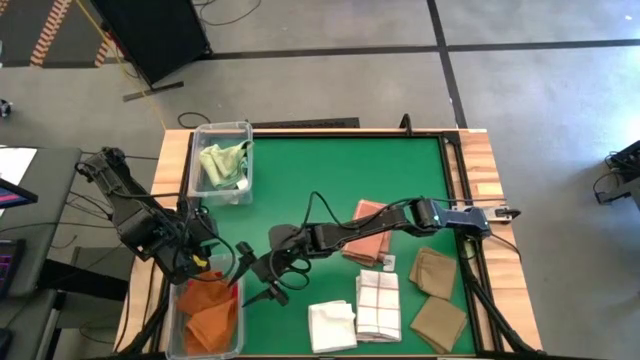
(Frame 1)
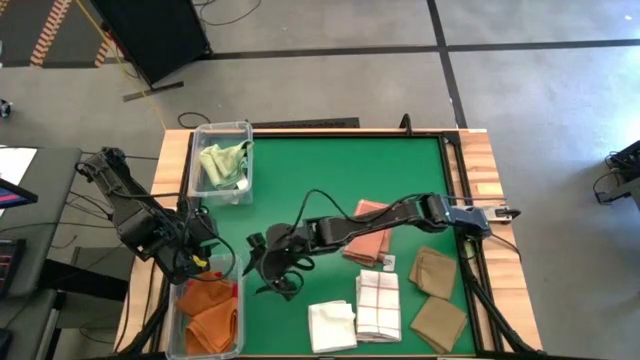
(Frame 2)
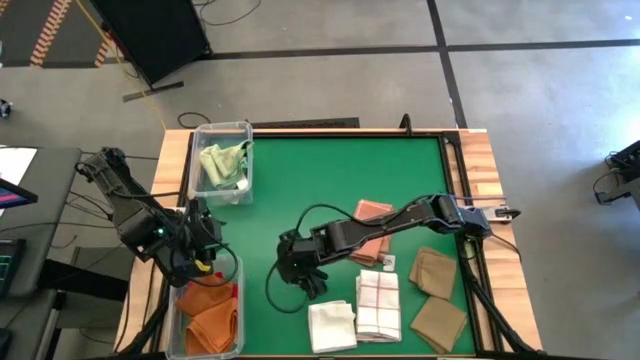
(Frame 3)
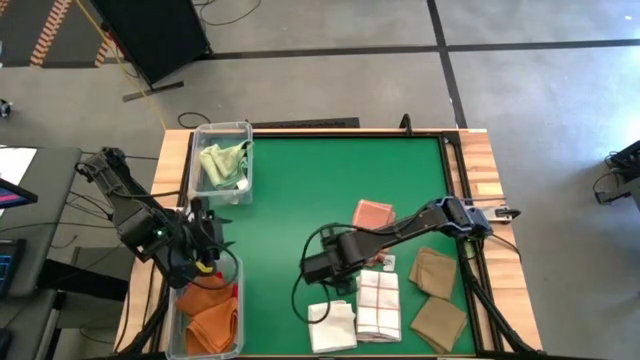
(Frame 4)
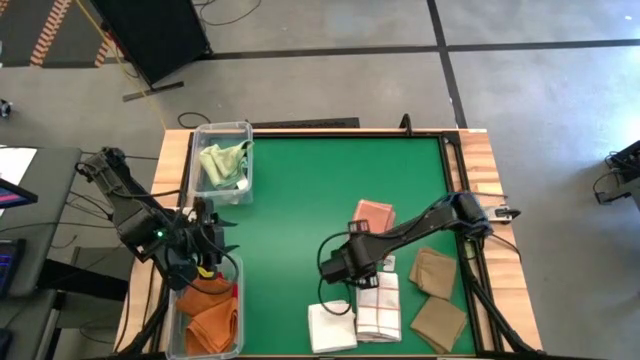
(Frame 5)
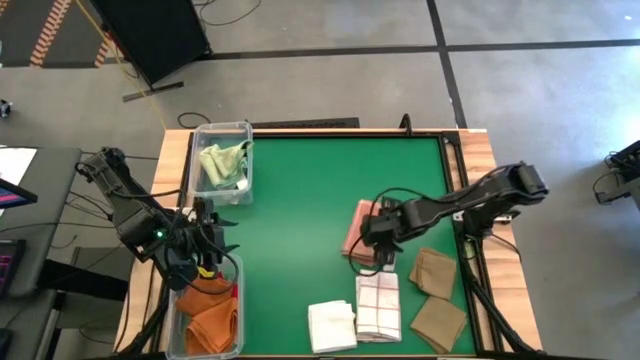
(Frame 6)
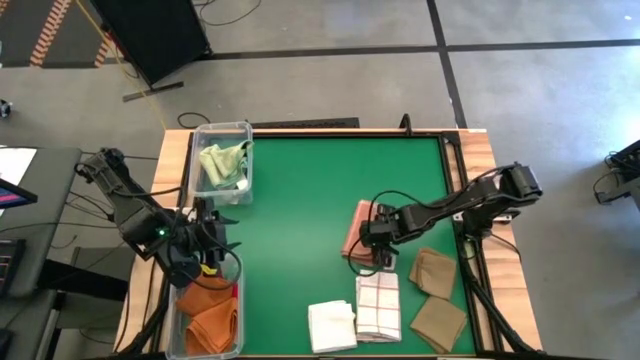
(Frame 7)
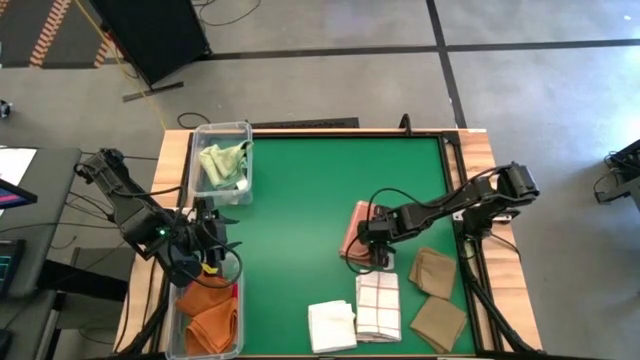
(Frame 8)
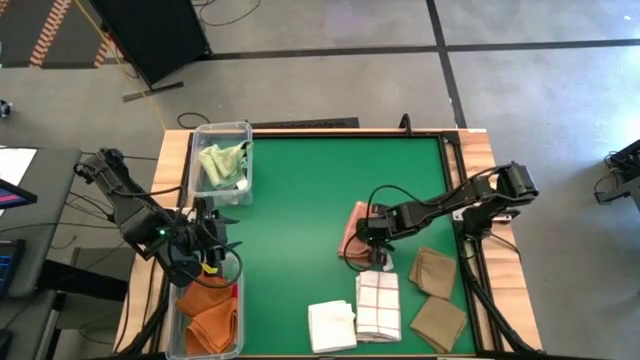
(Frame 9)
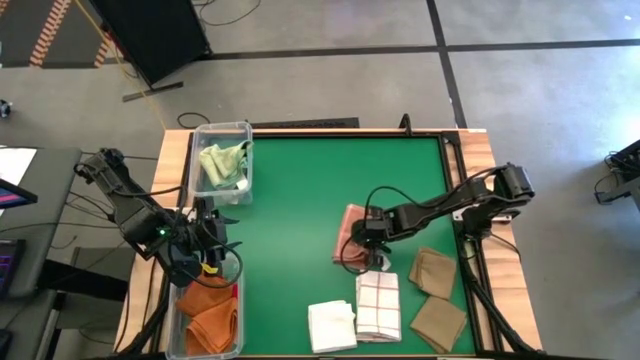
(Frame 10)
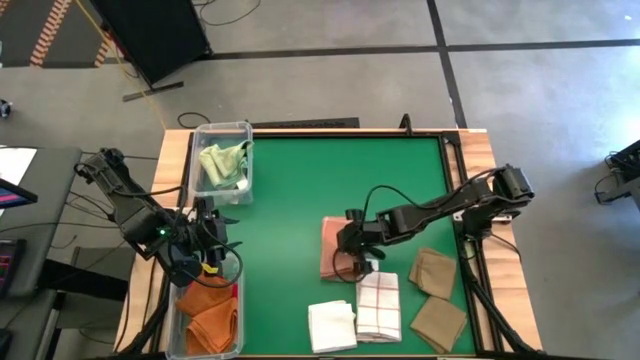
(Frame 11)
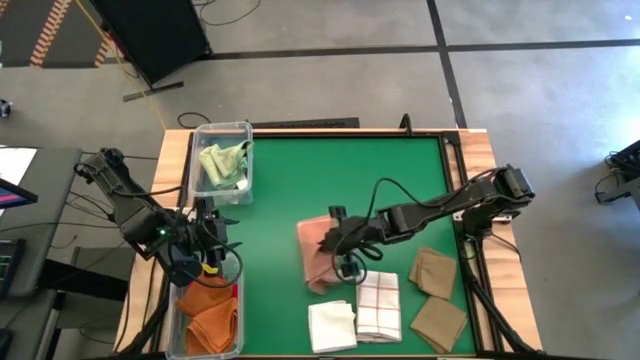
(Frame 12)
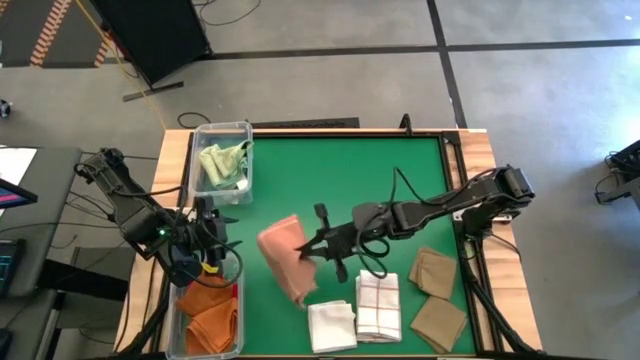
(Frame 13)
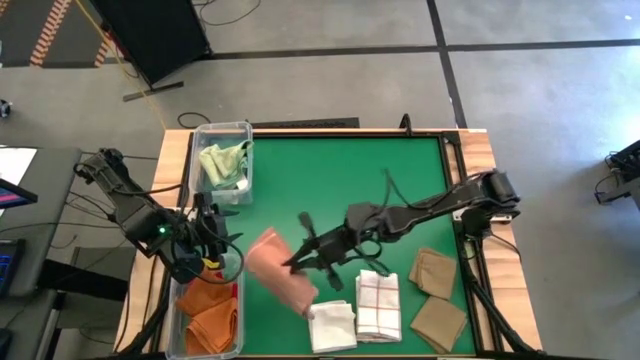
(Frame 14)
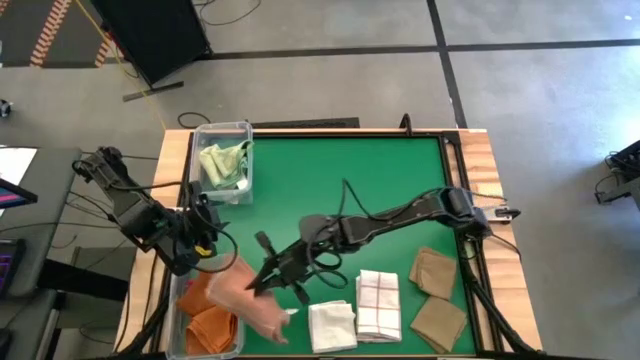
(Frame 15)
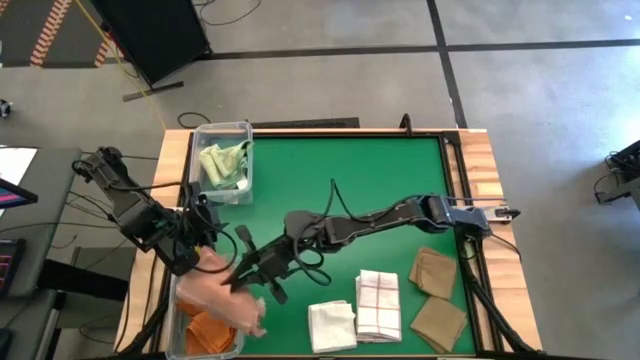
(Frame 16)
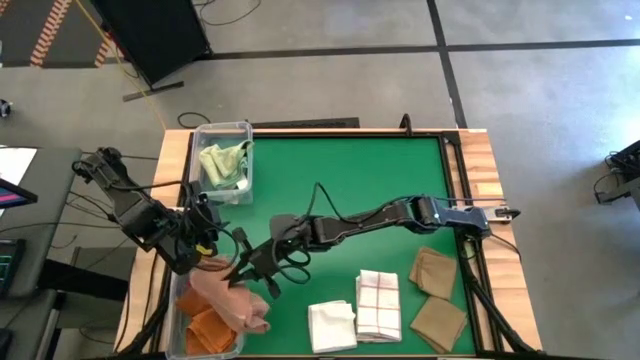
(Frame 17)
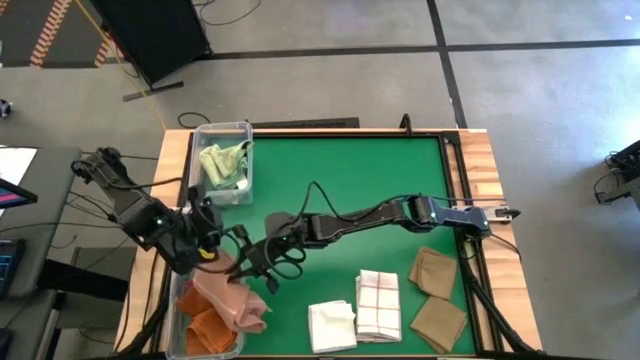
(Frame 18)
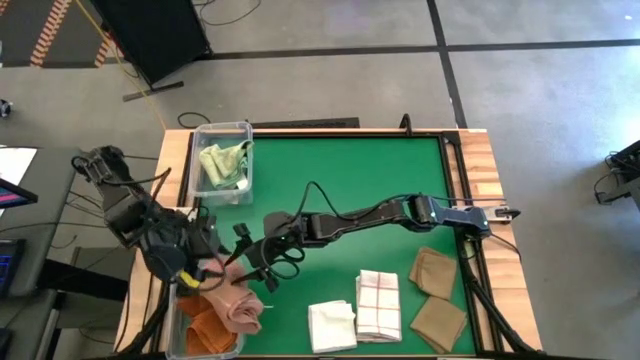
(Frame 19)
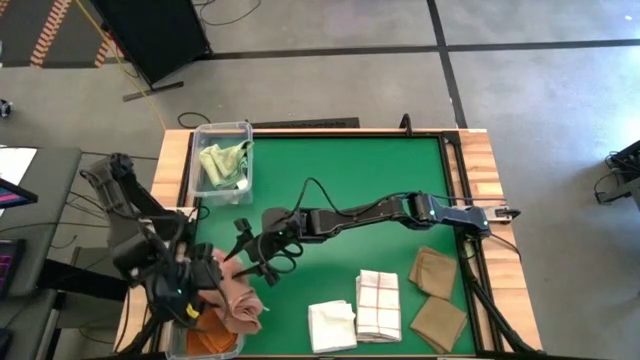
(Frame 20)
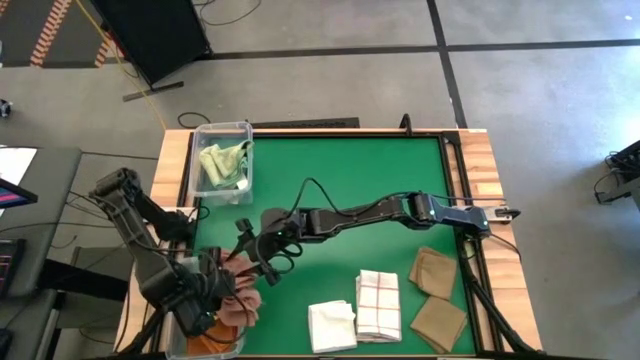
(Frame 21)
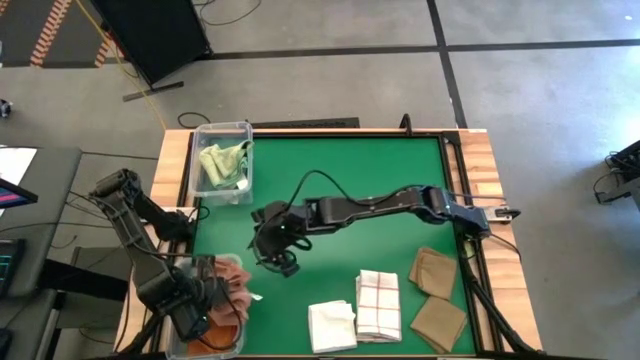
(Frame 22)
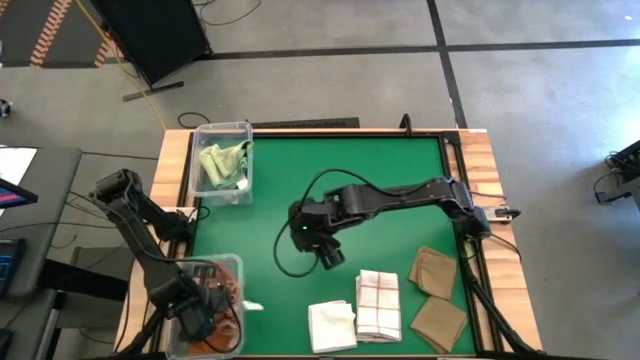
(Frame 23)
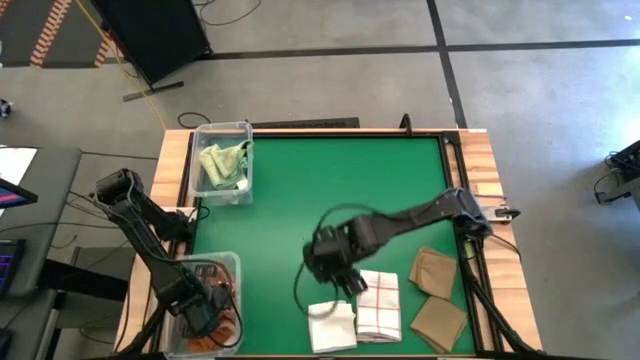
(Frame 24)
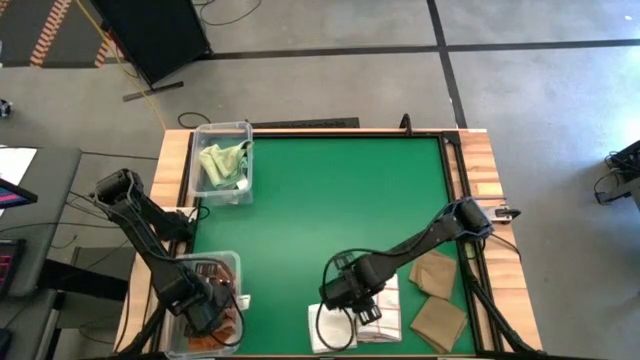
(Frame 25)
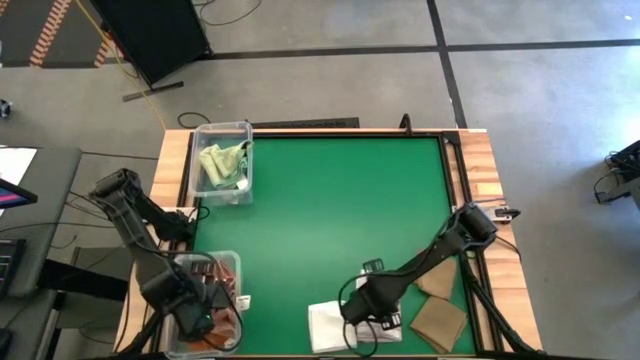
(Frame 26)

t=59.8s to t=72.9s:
Task: Sort towels by color in basket
Put the brown patterned towel into the bottom transparent bin

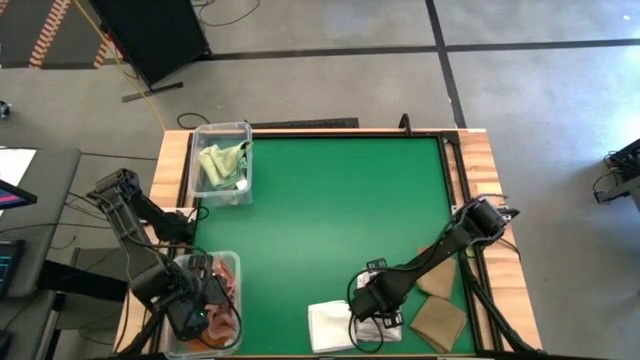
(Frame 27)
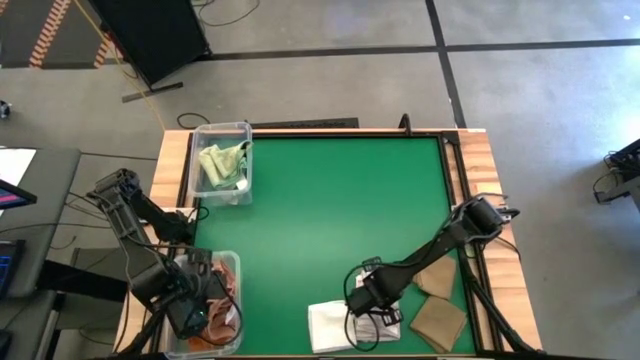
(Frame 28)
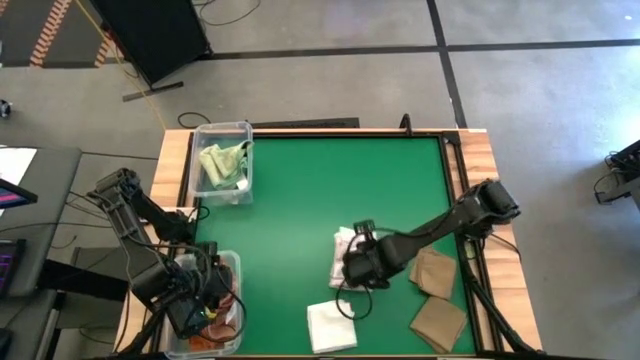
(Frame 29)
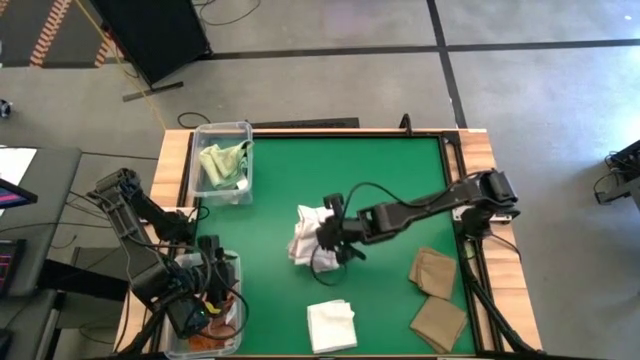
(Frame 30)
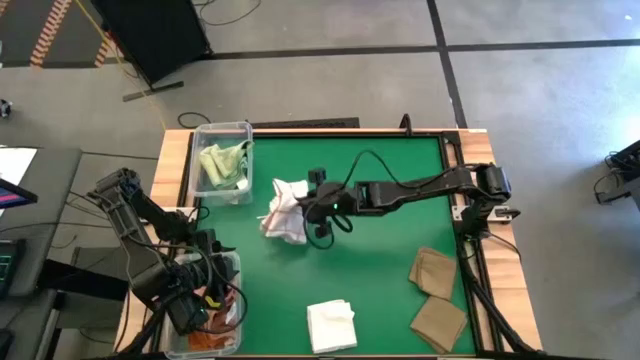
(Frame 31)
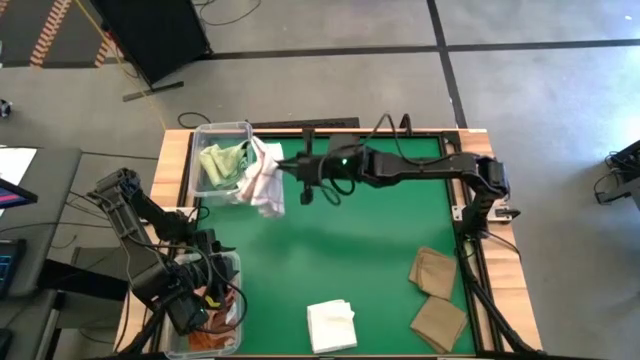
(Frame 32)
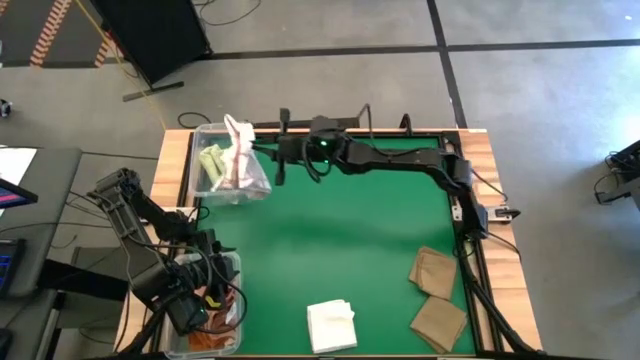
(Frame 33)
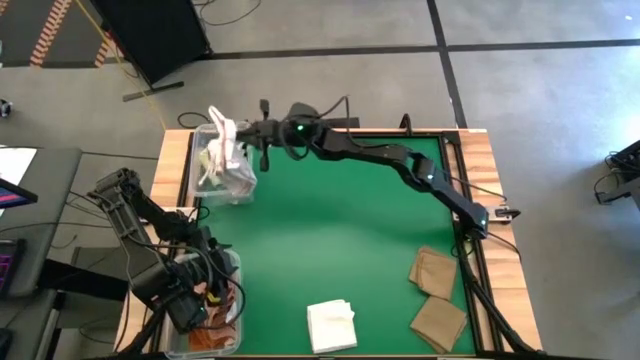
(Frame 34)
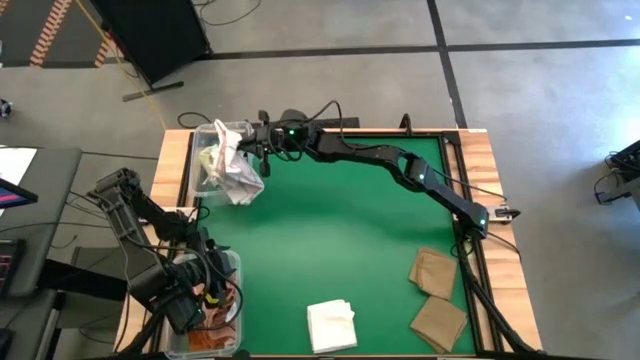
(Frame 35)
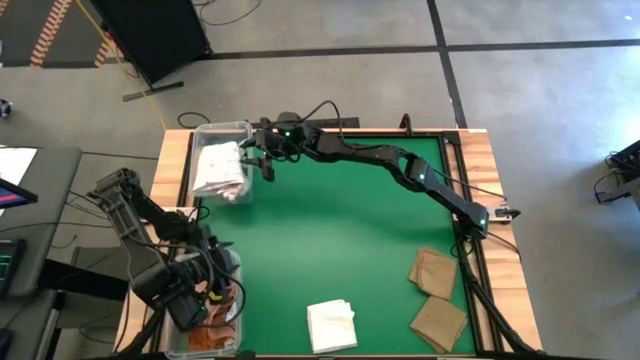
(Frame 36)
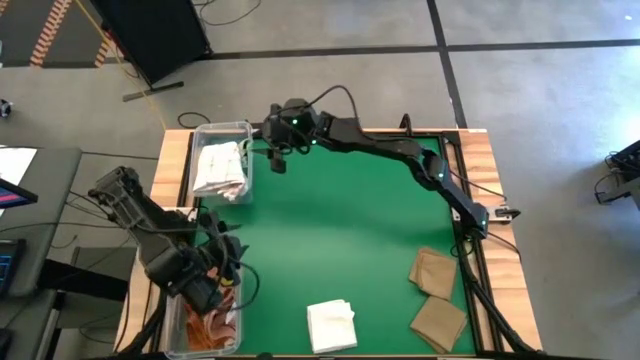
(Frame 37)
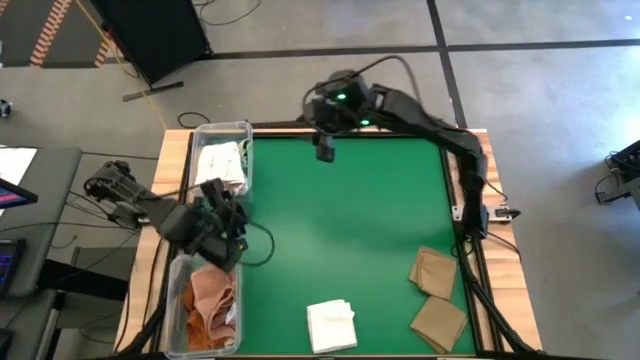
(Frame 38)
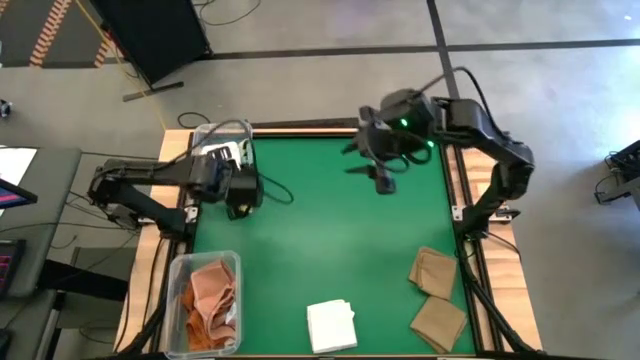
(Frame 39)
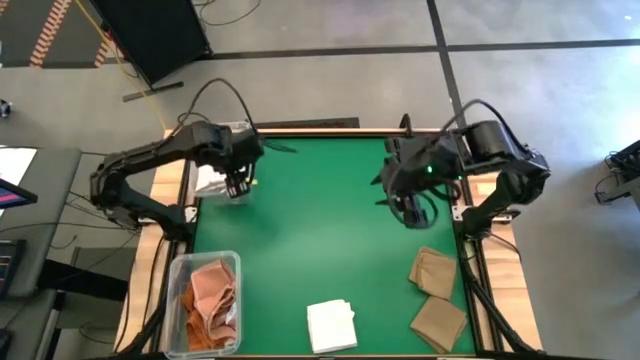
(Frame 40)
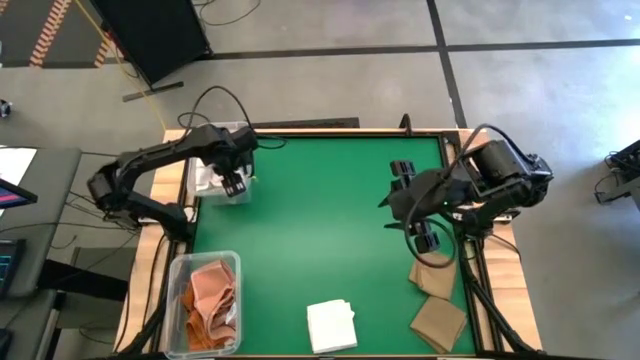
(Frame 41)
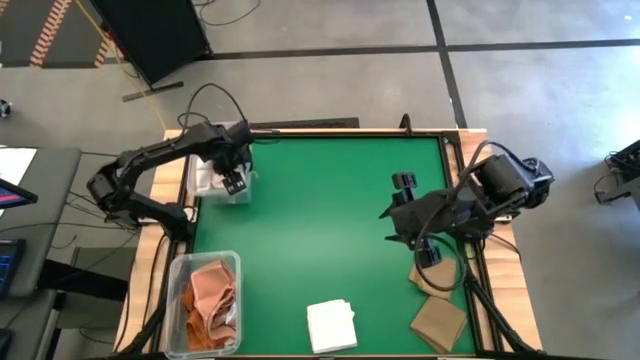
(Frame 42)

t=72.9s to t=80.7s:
Put the white patterned towel into the top transparent bin

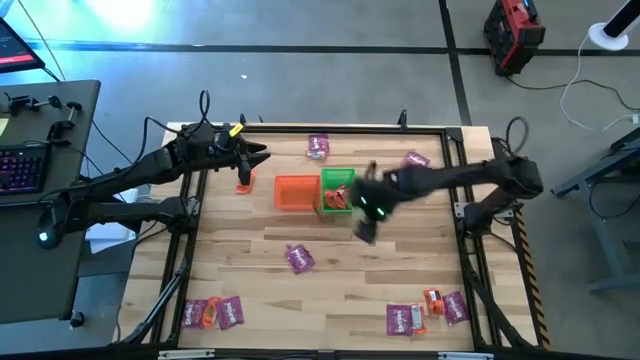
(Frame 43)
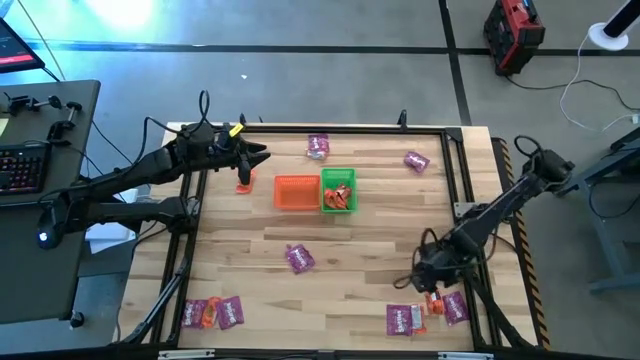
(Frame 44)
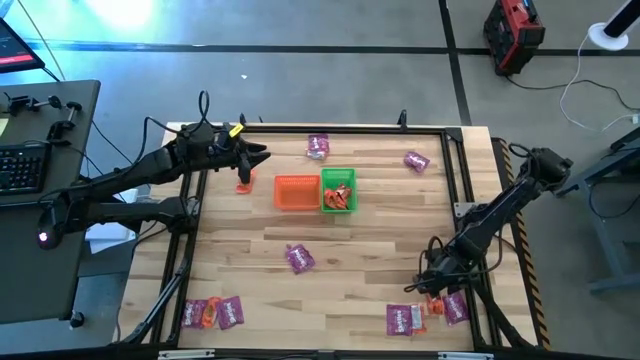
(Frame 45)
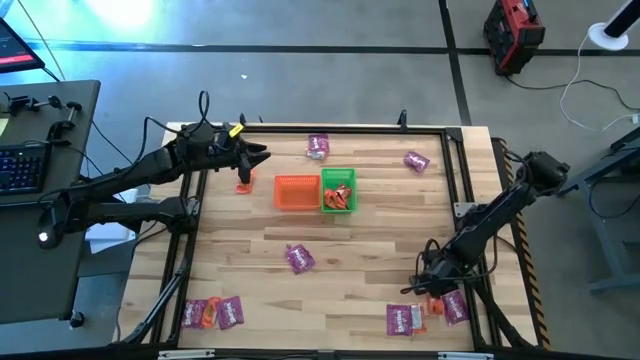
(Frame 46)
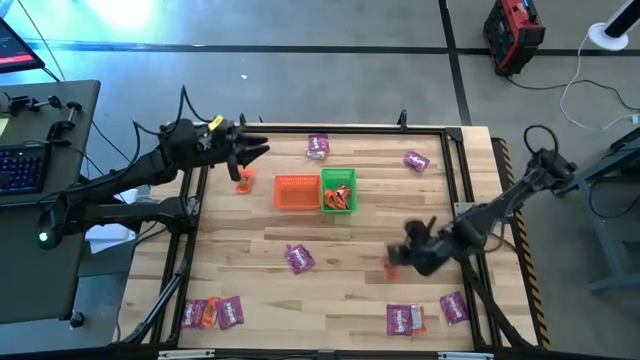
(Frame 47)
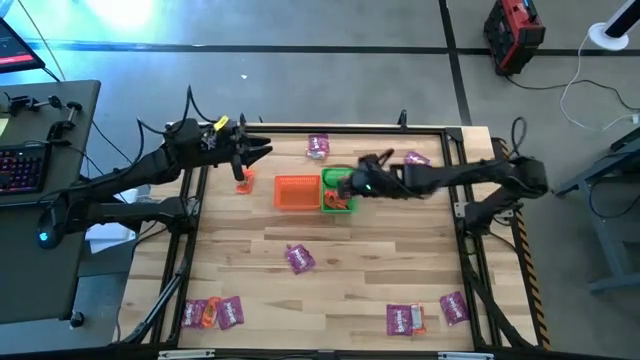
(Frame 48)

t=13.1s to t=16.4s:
Task: Sort candy by brand, put in halloween buckets
Put the orange chocolate into the green bin
